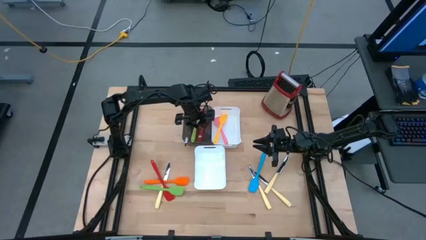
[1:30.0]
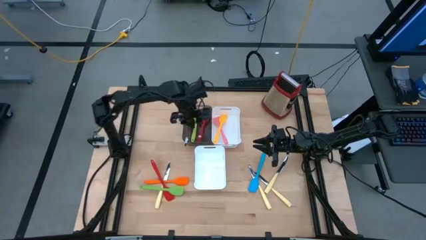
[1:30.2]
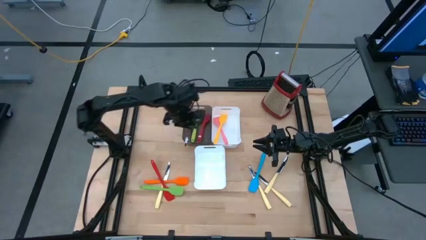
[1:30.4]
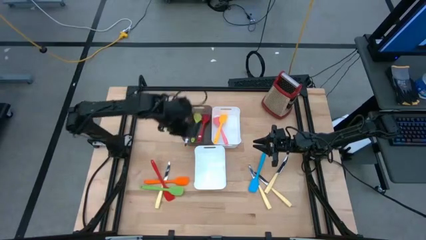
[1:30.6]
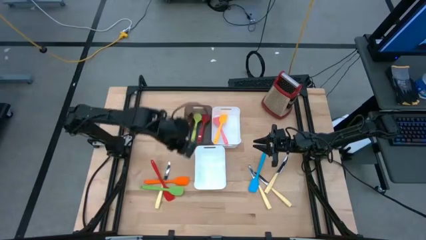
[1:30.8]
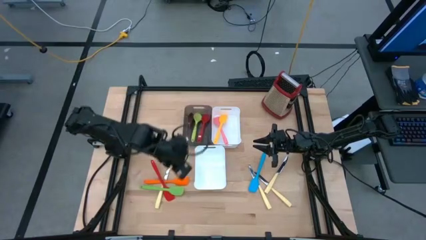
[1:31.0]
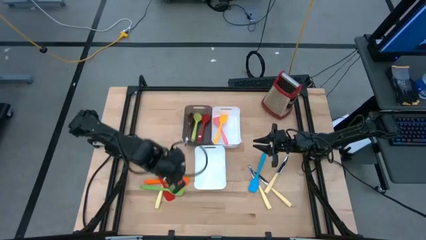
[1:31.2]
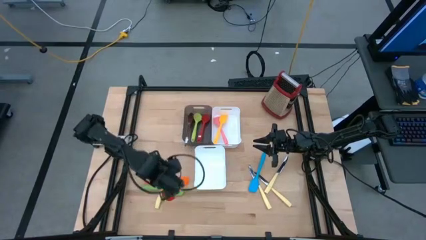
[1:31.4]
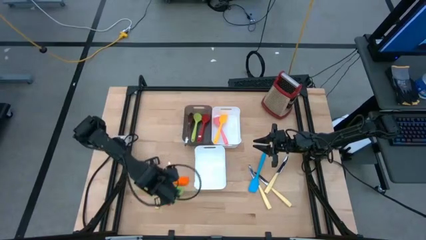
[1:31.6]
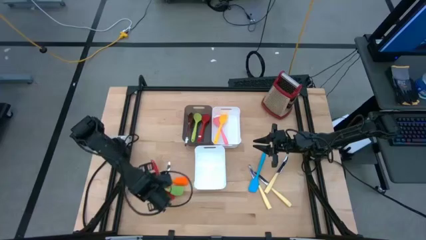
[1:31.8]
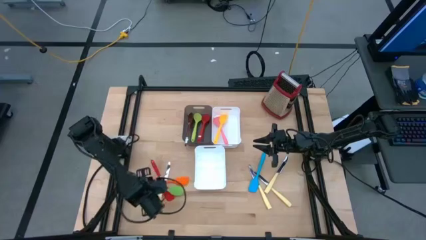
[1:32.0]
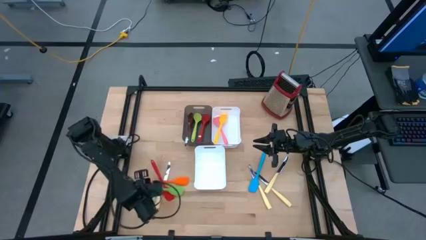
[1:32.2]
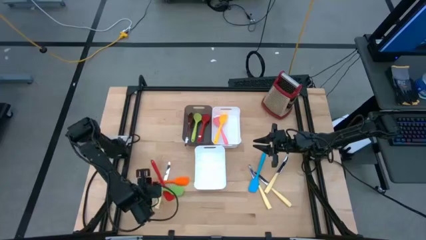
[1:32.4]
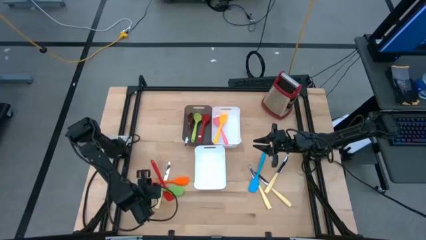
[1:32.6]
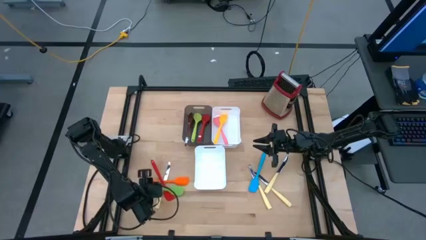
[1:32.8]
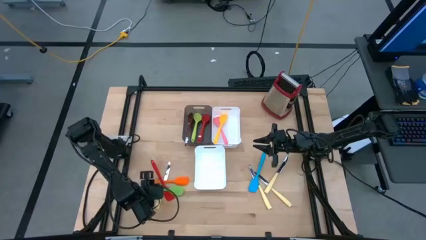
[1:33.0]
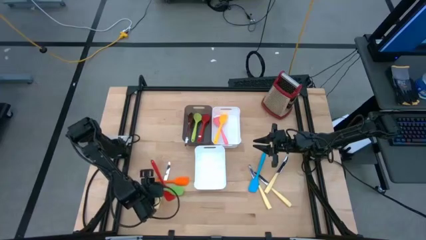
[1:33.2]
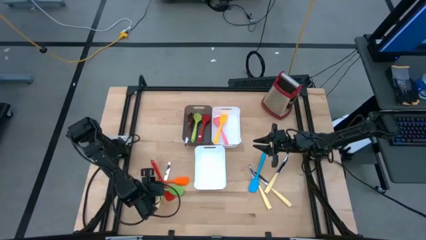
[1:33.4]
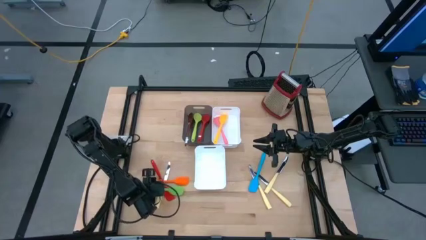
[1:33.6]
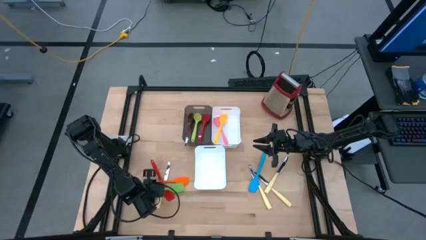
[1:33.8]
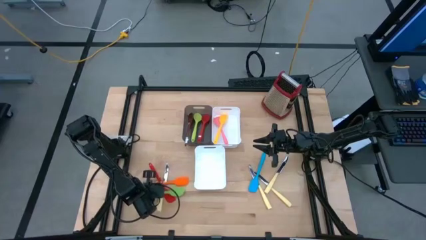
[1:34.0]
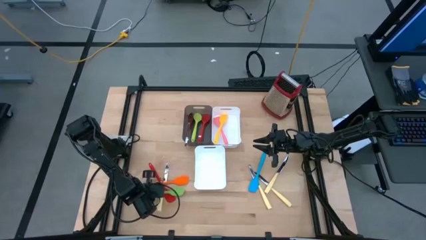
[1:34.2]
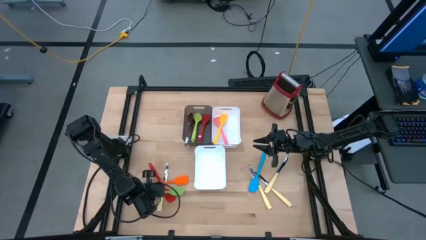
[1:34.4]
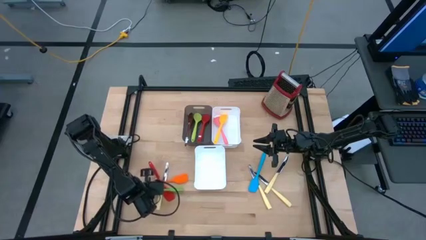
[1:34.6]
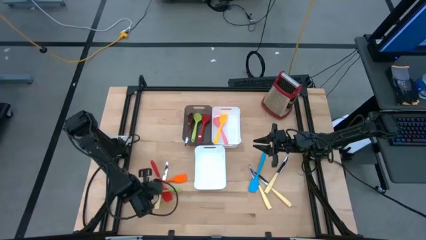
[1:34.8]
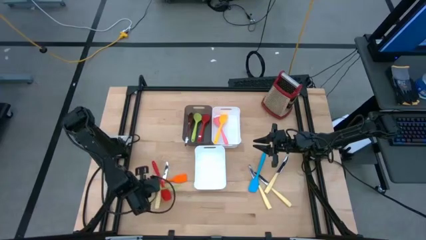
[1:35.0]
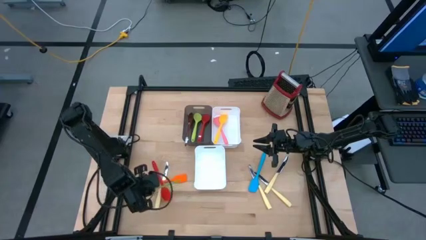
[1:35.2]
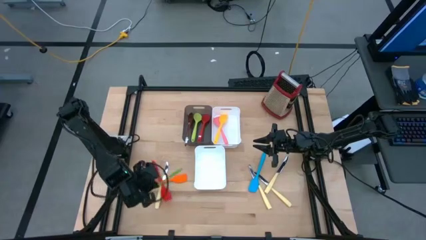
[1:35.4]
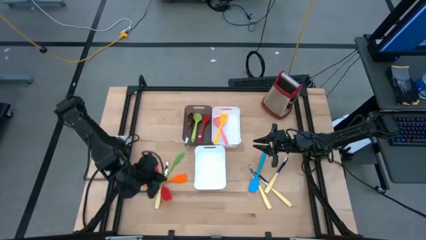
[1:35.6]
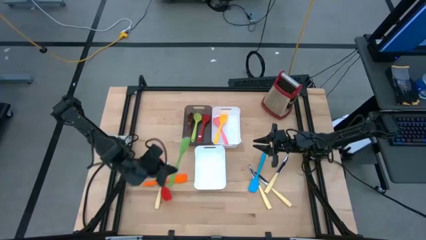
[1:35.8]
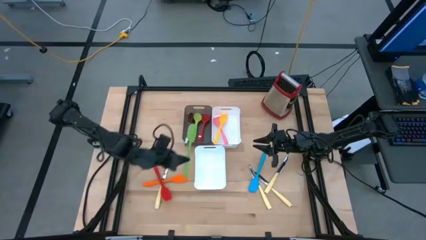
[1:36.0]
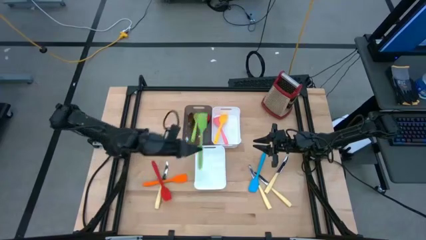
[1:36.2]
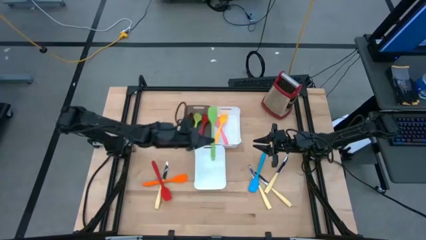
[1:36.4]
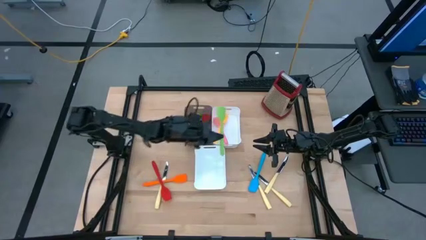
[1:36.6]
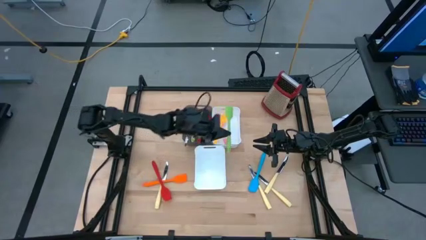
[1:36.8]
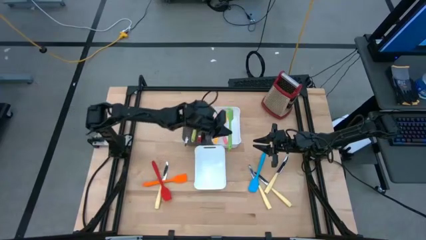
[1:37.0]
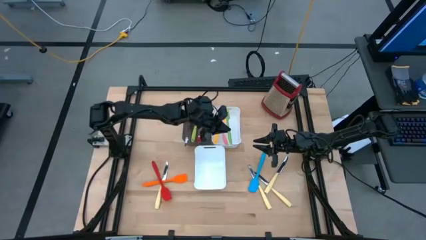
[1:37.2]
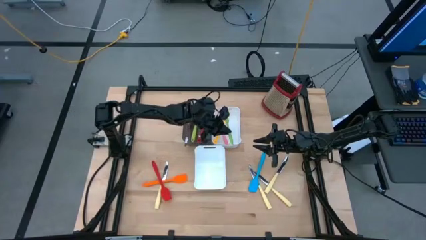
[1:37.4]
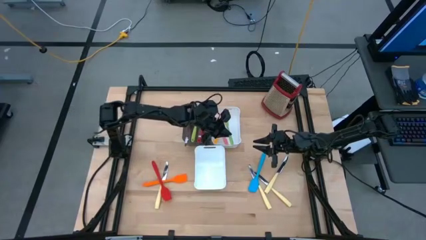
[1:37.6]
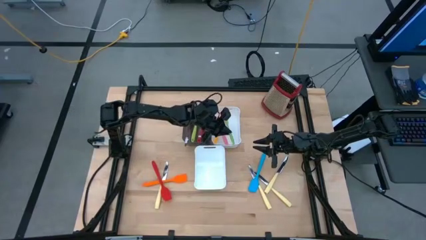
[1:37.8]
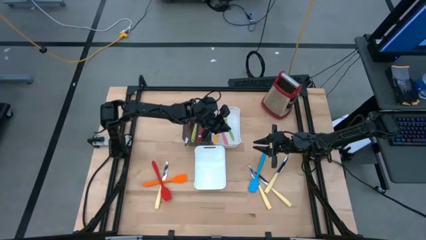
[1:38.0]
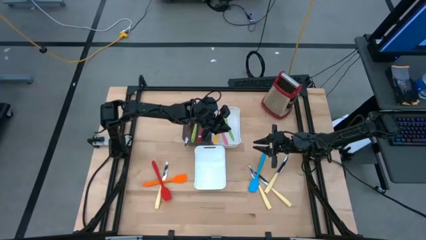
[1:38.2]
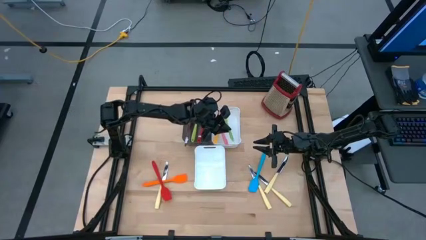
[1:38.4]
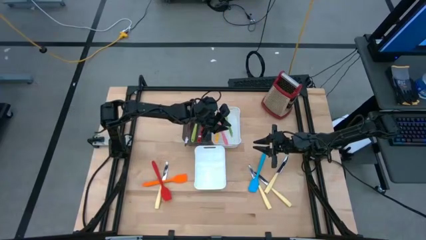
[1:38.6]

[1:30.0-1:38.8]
Task: Pick & Place Kitchen Items
Put the green spatula into the top white bin

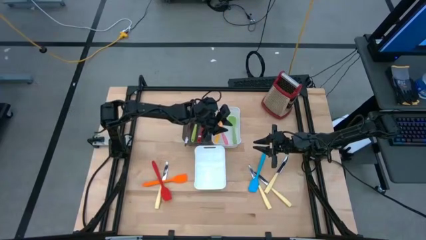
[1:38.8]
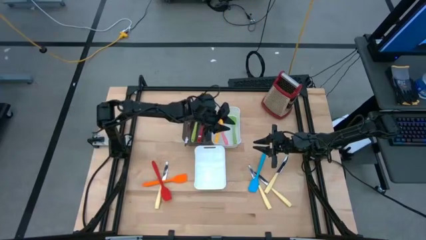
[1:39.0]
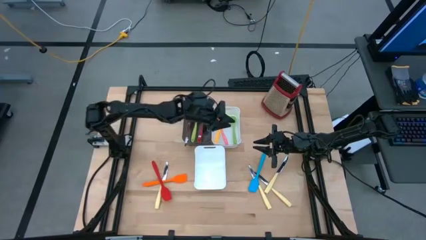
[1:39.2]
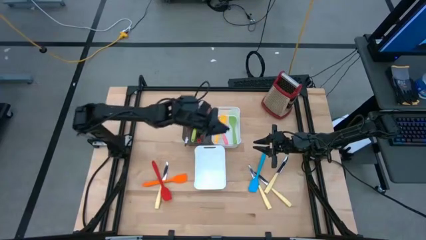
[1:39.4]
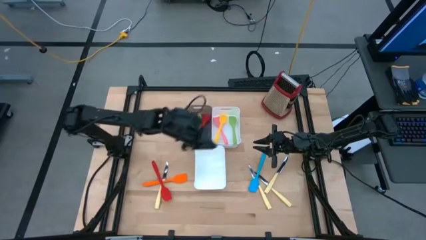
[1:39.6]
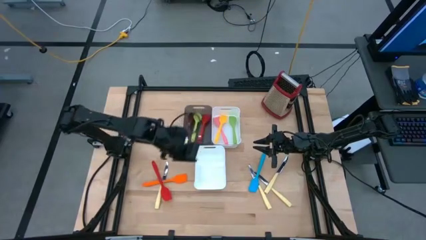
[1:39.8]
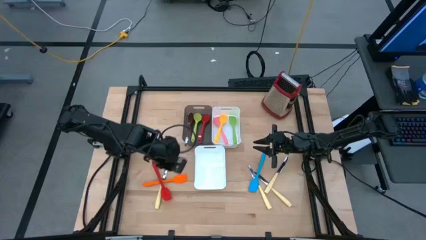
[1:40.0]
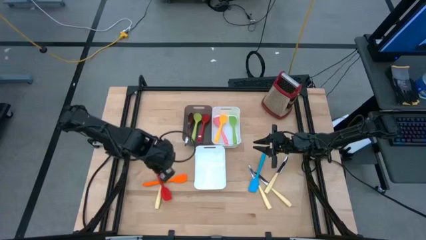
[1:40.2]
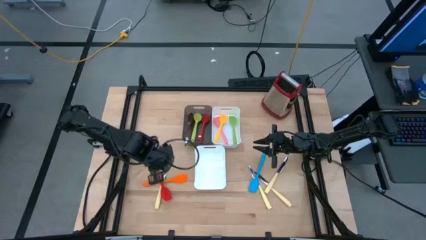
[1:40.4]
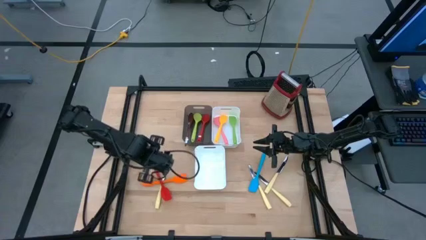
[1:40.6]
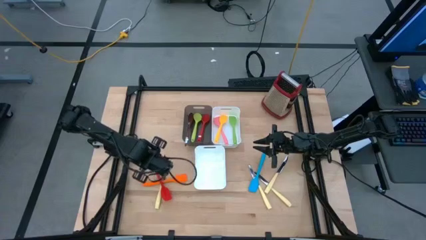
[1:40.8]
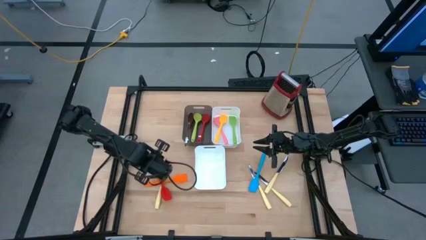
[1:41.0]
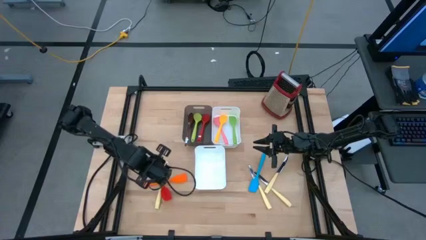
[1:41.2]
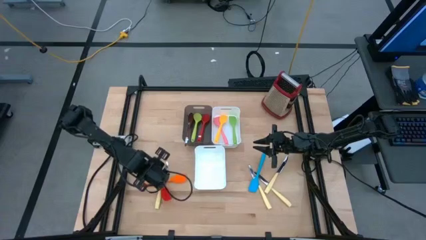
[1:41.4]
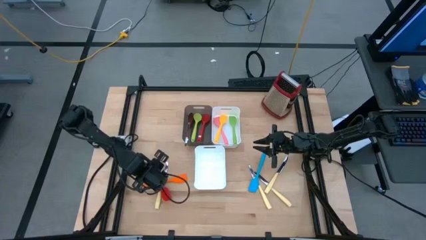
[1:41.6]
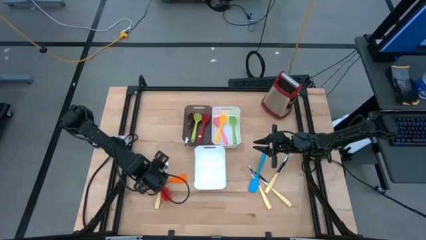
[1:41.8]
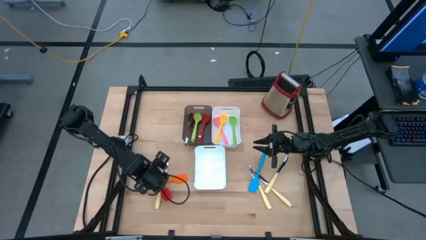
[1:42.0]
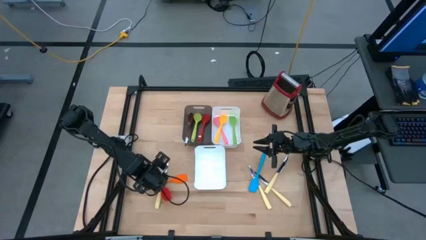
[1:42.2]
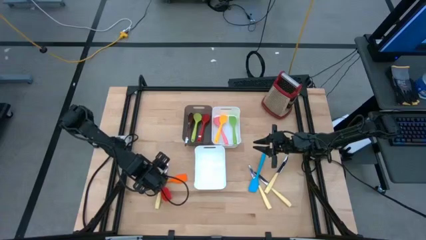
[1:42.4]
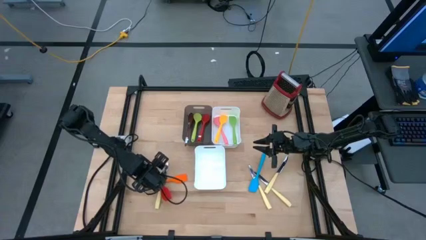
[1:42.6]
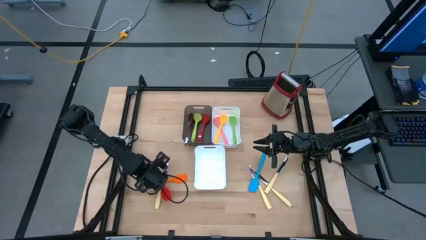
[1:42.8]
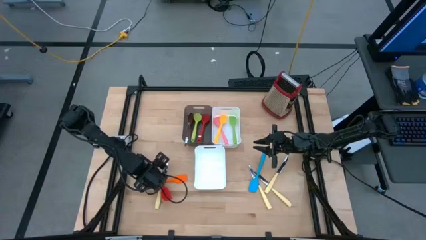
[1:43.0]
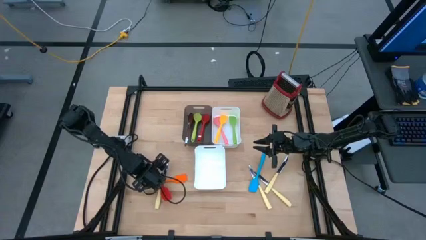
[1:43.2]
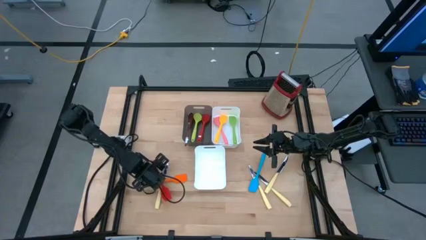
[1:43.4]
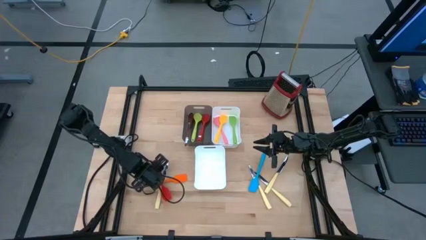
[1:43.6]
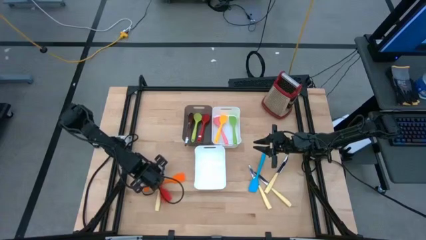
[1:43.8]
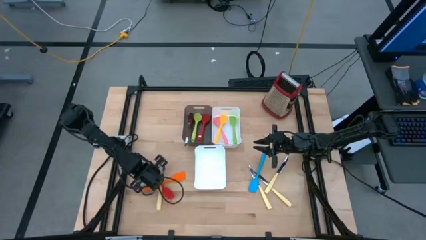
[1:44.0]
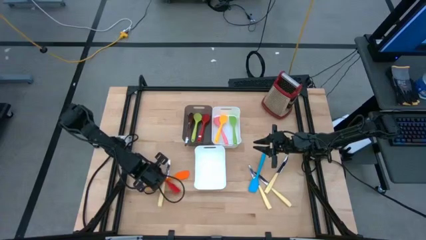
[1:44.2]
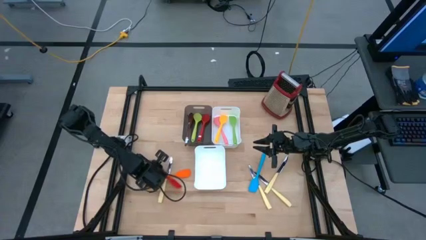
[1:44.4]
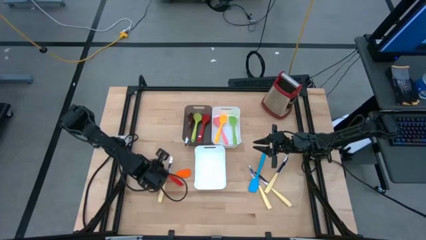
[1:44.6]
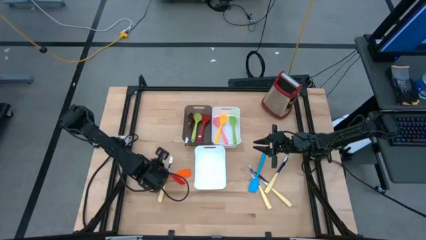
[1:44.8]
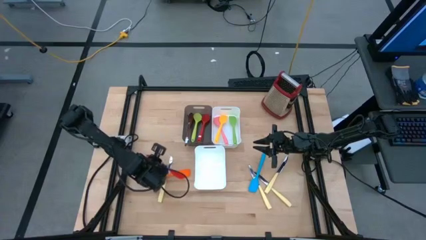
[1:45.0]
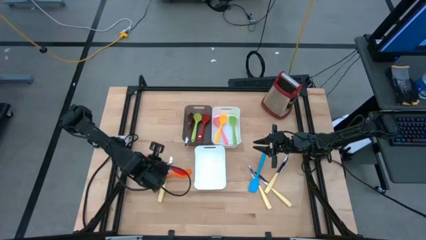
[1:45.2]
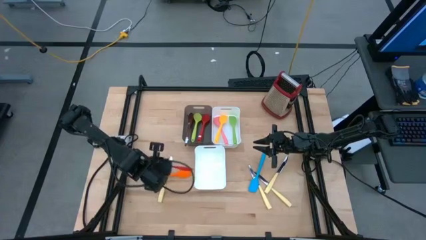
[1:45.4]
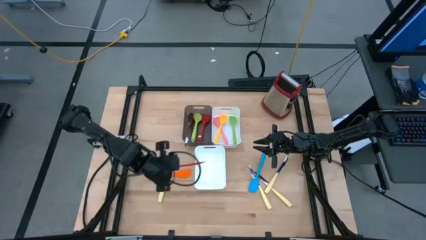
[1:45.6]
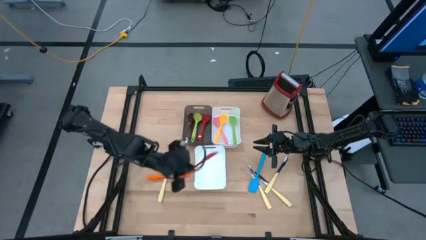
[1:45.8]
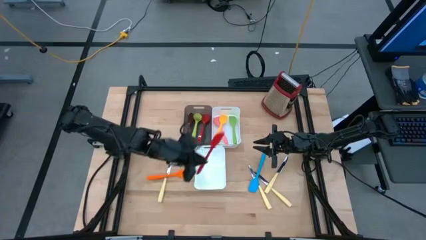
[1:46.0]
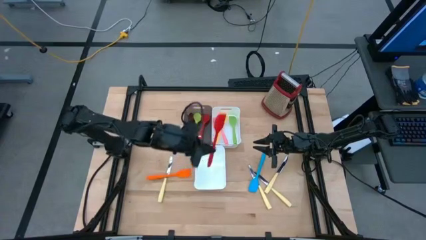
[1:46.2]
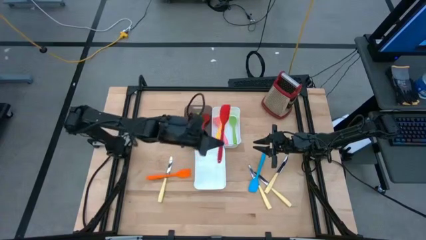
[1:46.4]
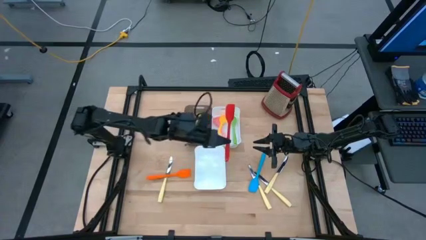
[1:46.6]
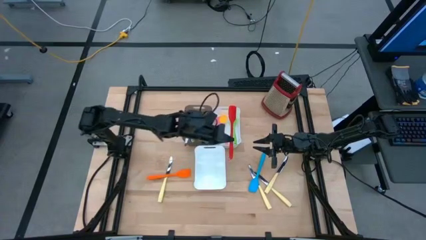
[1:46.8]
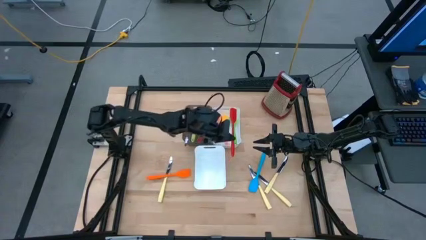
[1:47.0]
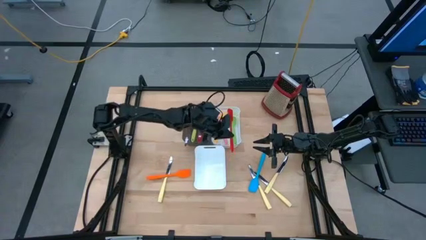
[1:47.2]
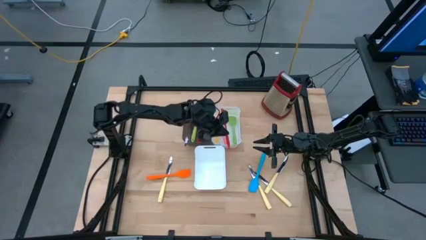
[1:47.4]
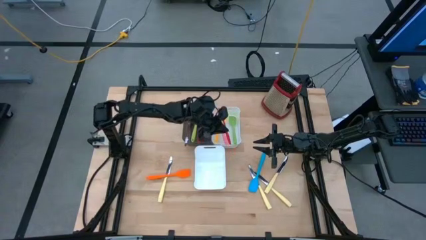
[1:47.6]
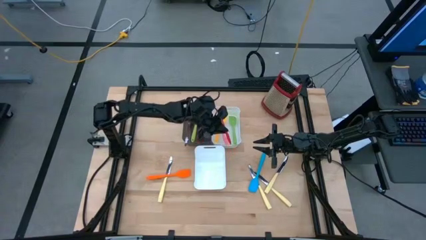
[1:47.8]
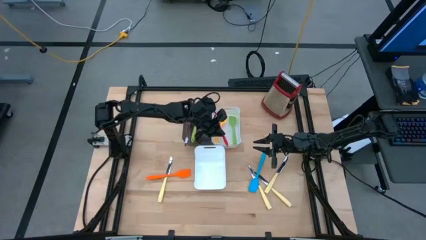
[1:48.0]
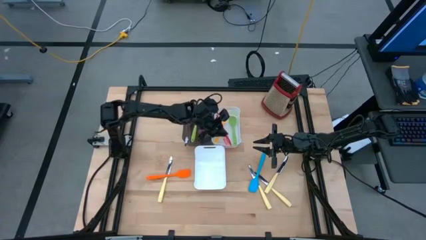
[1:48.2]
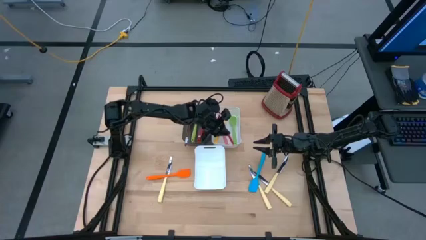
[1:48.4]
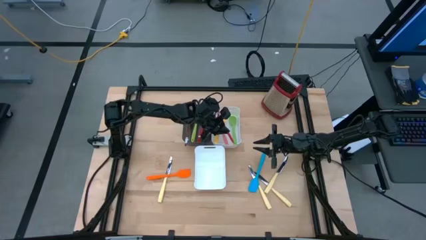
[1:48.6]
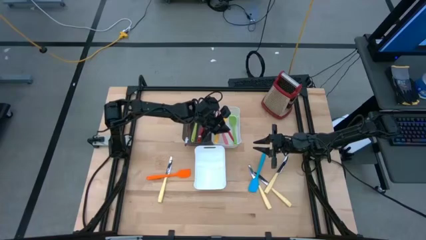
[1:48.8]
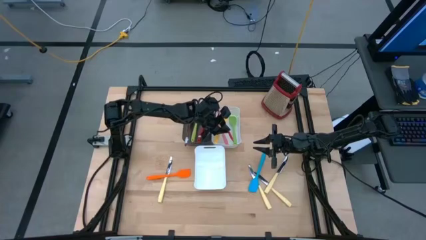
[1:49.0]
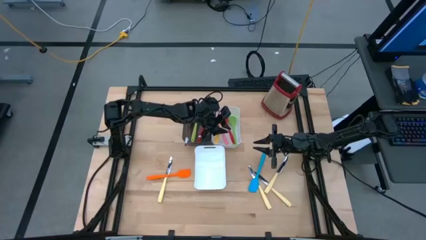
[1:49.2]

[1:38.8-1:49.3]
Put the red spatula into the top white bin
